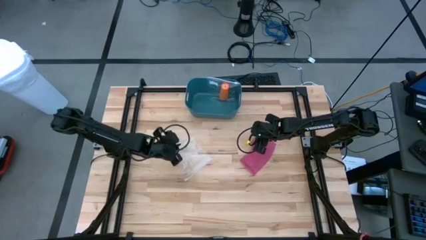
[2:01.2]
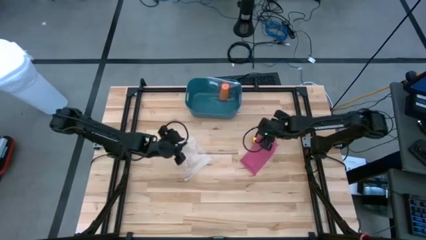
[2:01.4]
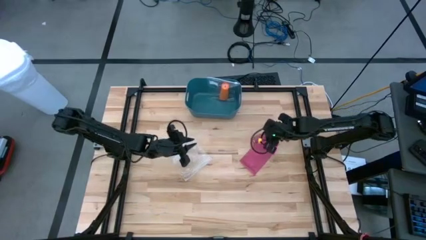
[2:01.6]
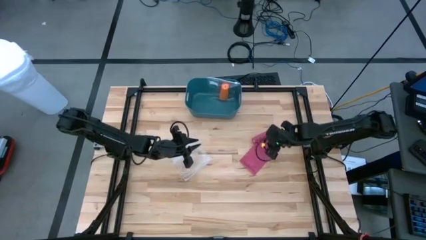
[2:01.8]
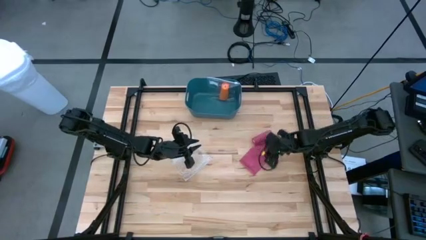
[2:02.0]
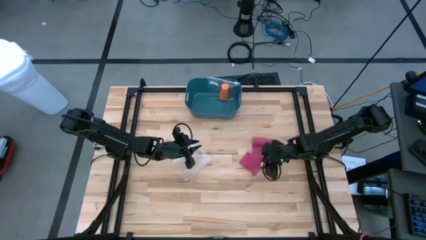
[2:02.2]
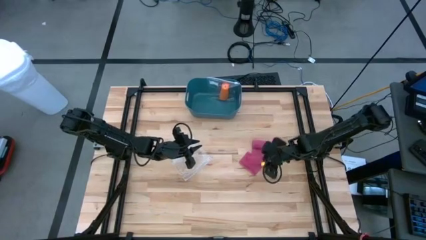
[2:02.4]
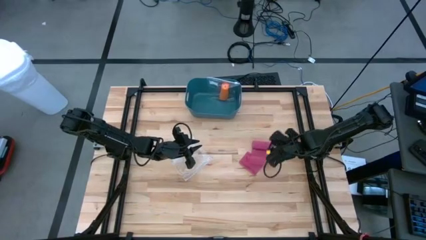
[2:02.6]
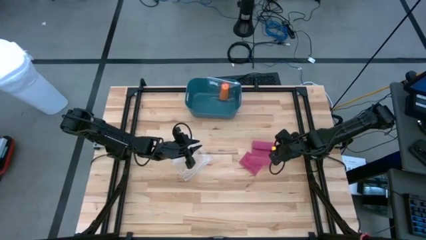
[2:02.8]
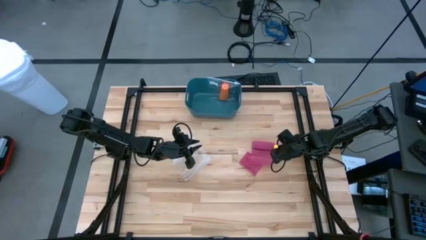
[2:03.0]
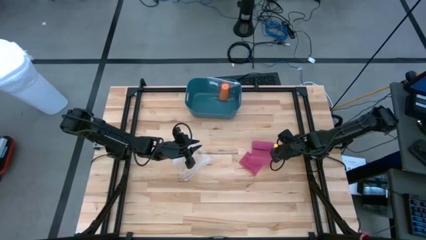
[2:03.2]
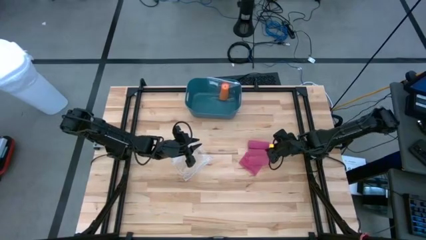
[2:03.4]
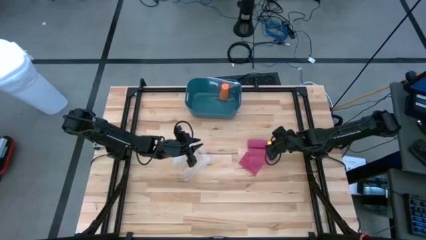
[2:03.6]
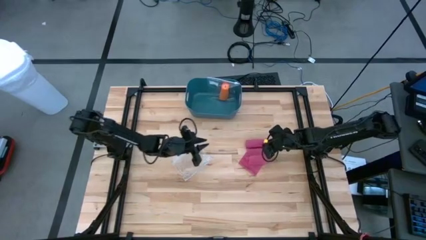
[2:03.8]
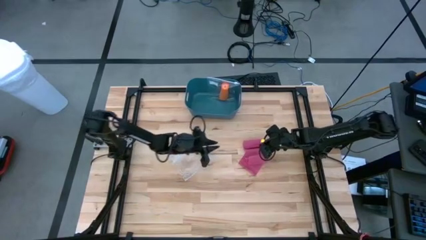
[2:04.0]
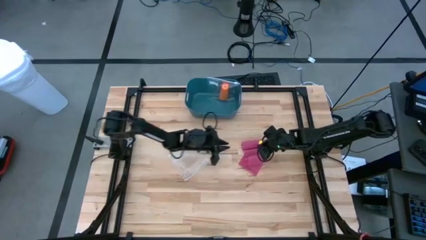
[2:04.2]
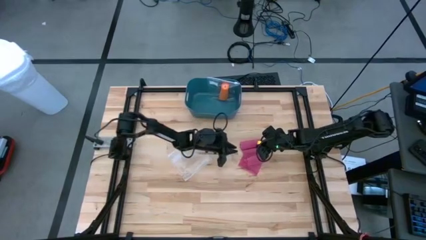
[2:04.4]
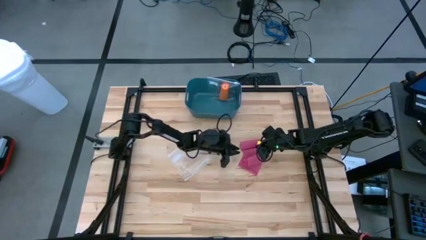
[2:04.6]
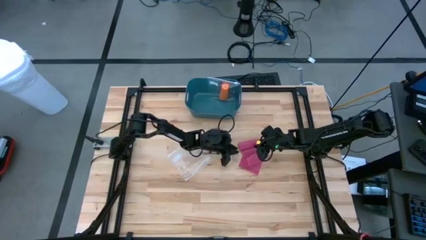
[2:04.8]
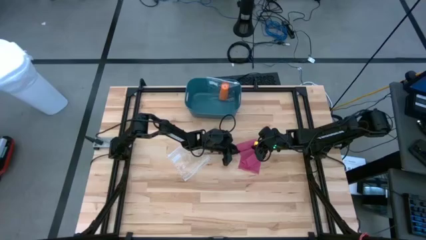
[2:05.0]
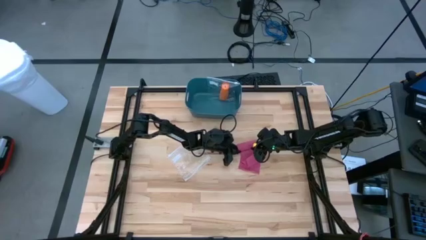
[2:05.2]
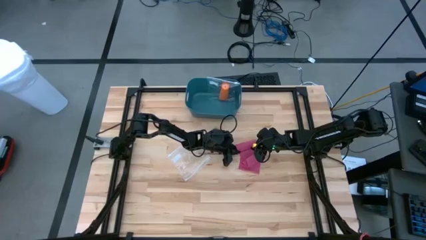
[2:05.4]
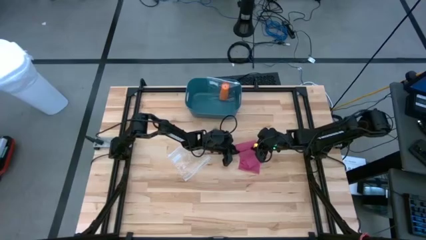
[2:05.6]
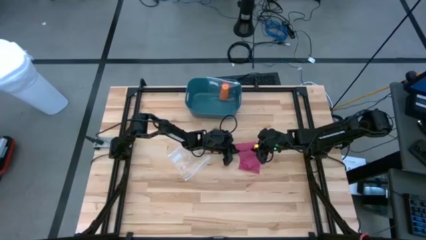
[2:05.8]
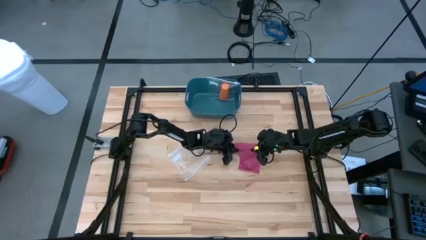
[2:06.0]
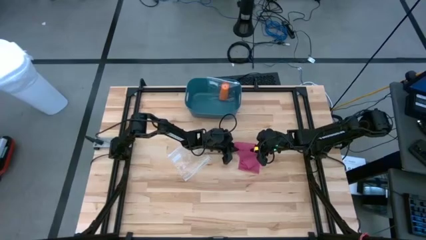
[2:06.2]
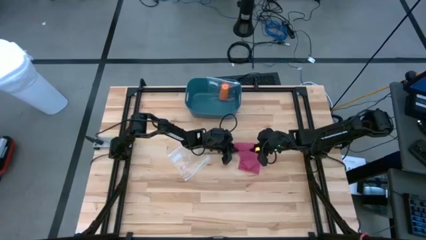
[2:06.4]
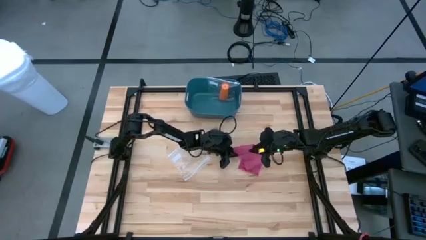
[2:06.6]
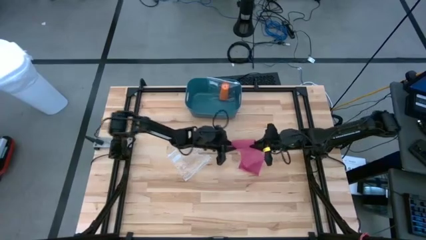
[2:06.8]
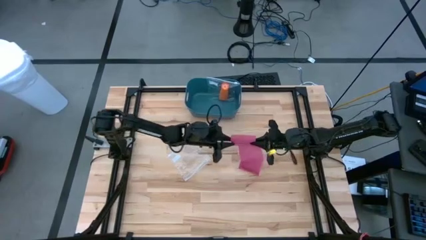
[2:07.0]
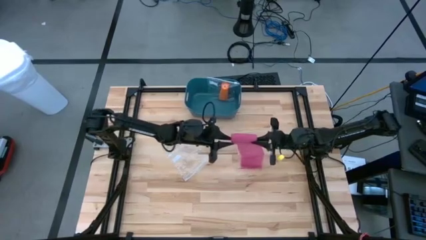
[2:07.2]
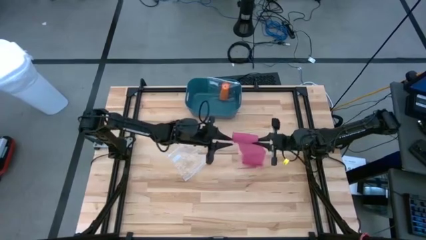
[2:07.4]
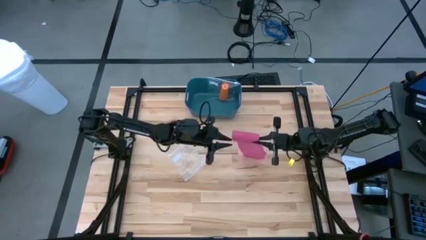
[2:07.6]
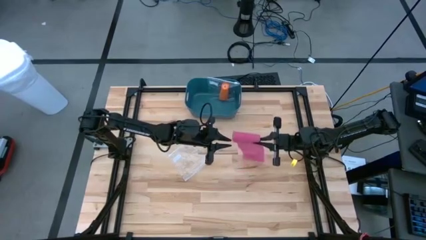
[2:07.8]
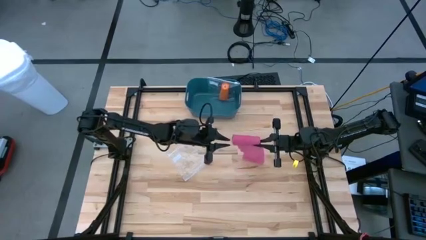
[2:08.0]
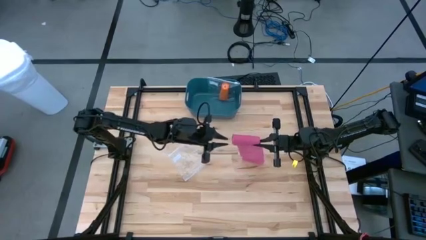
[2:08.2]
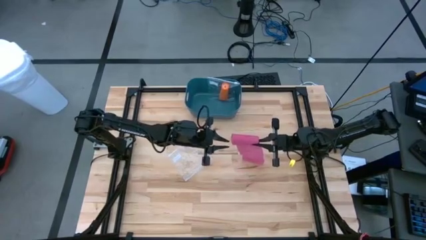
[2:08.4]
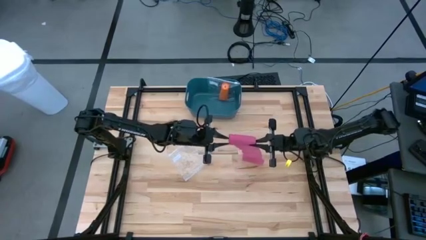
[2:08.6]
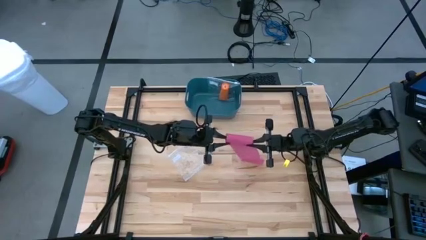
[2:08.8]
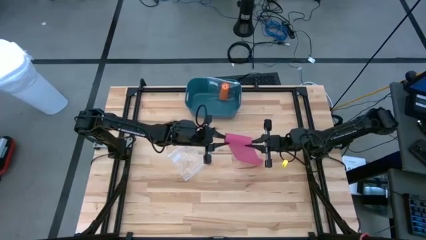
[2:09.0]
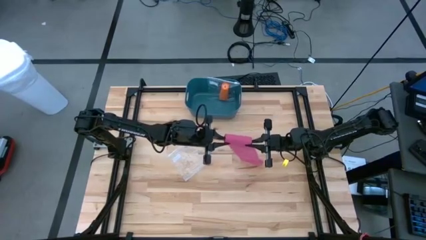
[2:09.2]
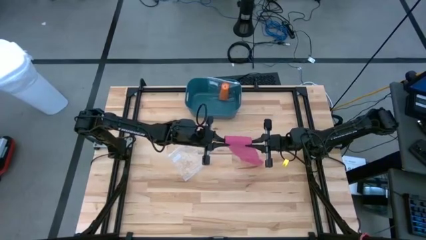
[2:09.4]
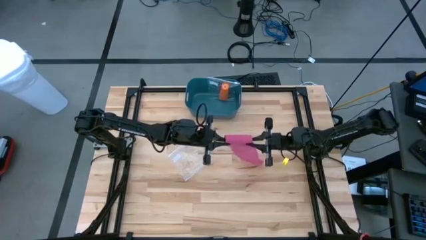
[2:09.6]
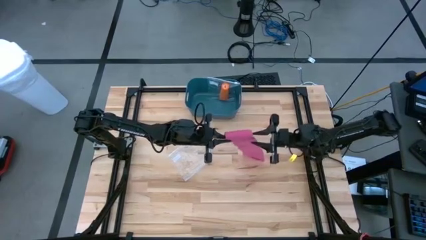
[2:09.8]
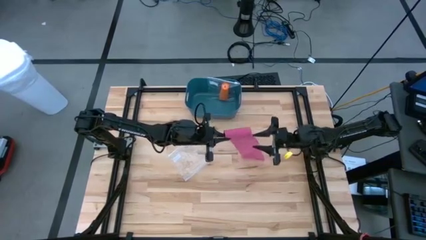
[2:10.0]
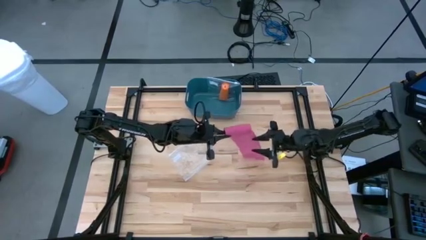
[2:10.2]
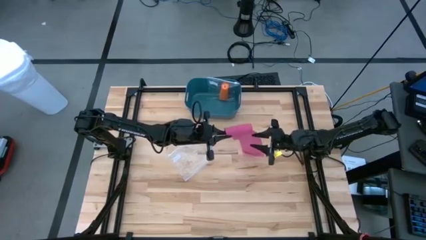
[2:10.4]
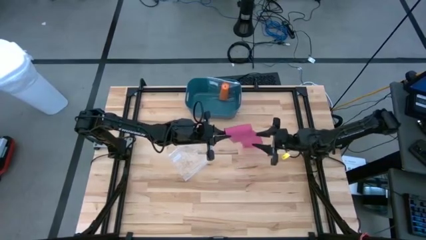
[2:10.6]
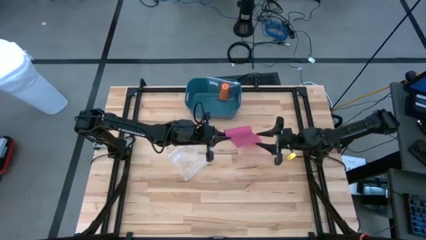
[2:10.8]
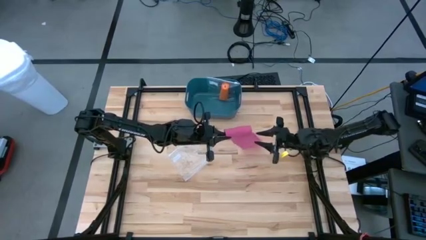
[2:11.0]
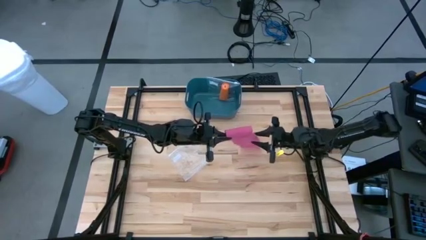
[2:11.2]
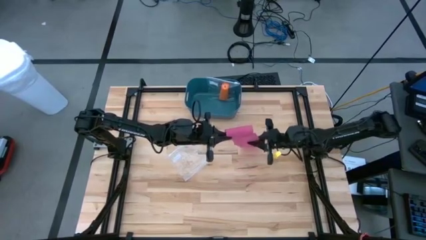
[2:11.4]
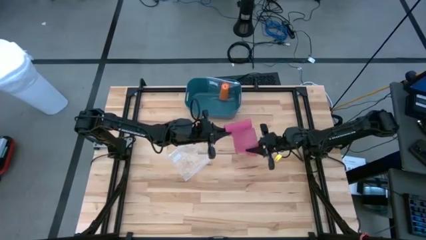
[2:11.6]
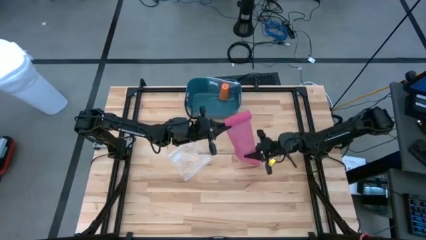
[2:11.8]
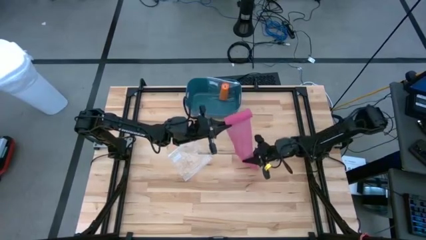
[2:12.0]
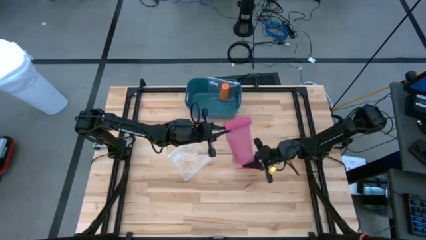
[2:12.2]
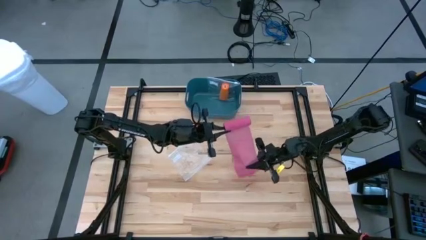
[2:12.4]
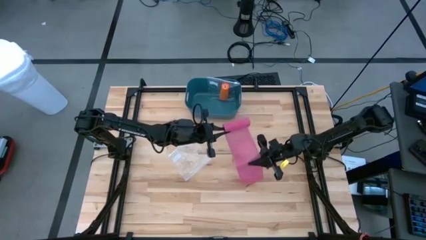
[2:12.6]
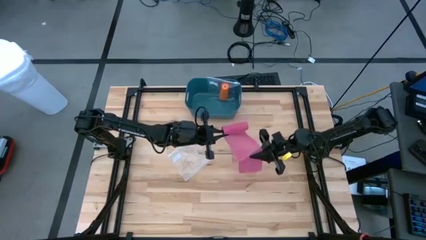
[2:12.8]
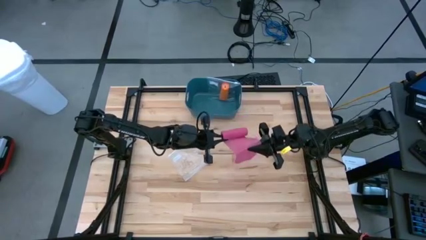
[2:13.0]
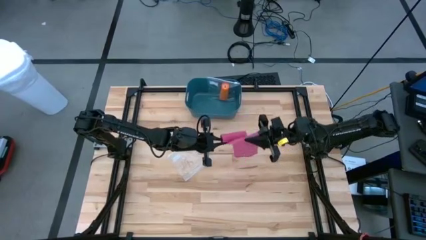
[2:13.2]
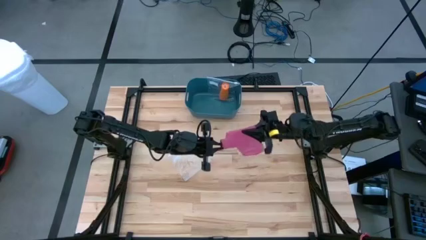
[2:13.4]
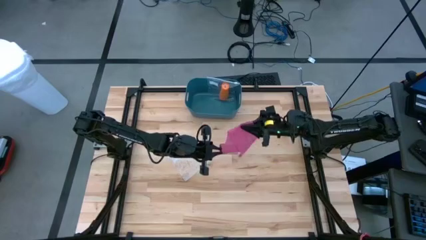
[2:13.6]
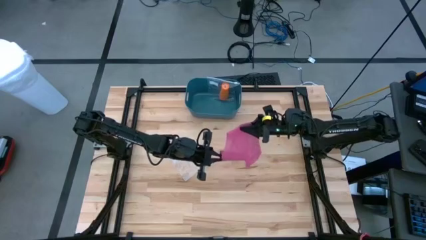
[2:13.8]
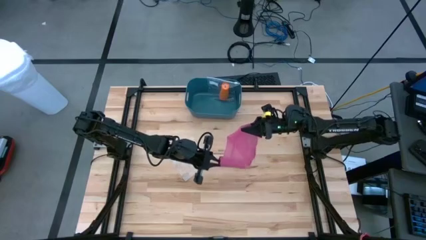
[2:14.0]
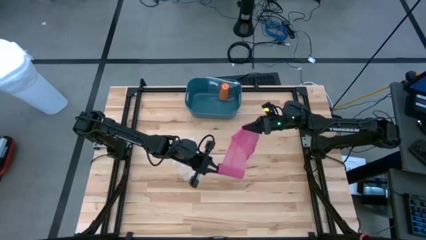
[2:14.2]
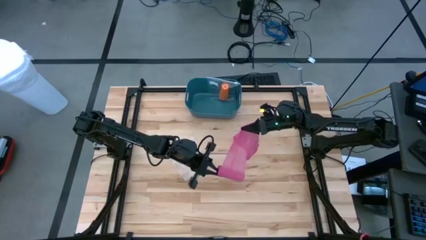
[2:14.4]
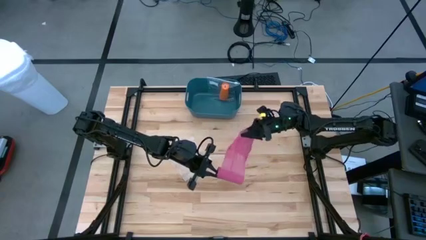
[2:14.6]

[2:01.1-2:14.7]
Task: Roll bandage
Roll the pink bandage
